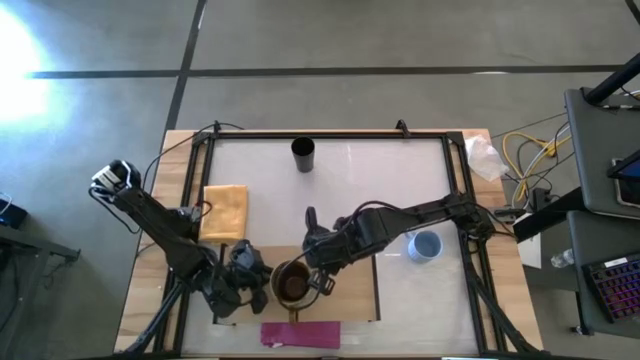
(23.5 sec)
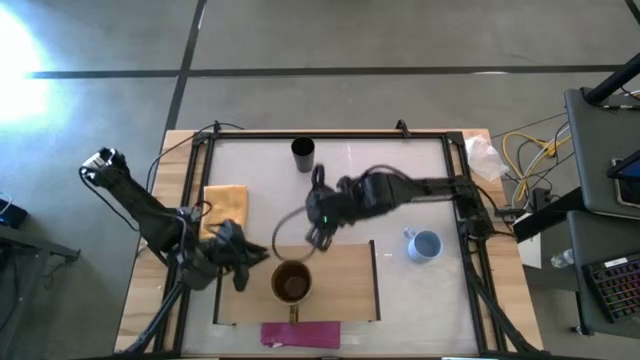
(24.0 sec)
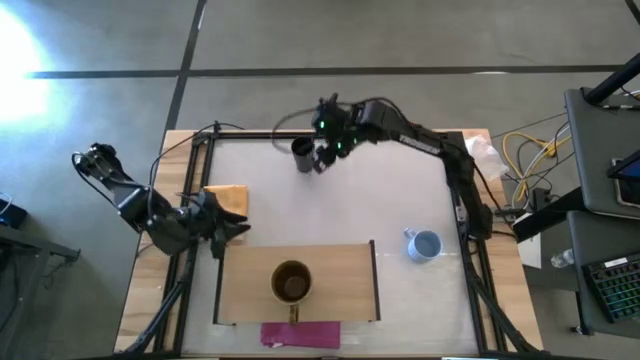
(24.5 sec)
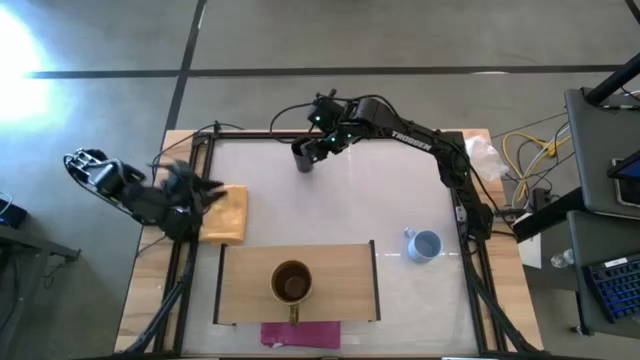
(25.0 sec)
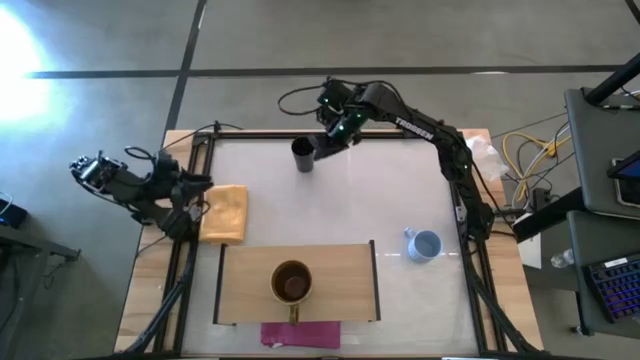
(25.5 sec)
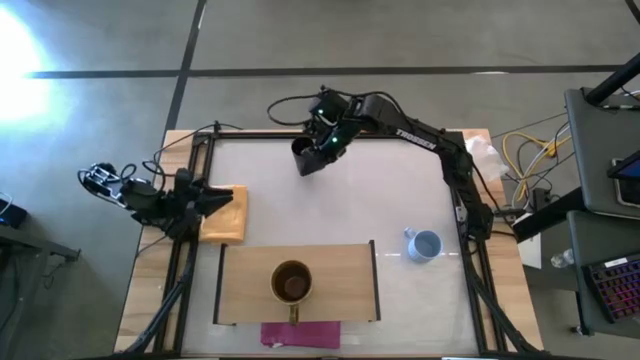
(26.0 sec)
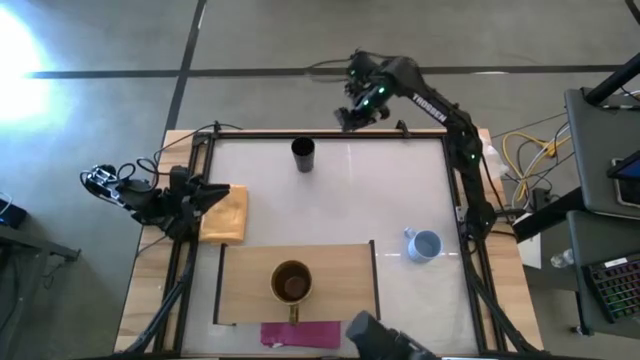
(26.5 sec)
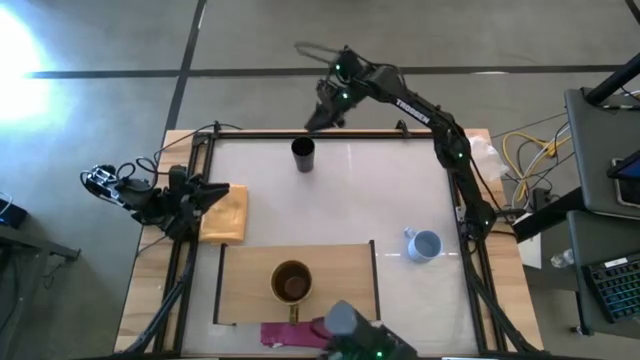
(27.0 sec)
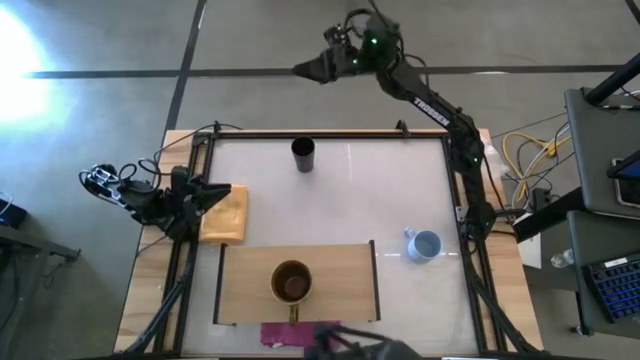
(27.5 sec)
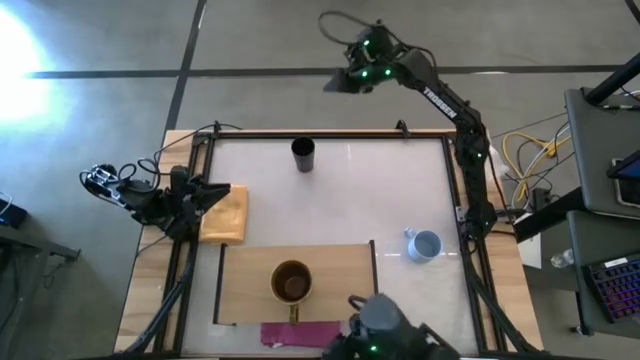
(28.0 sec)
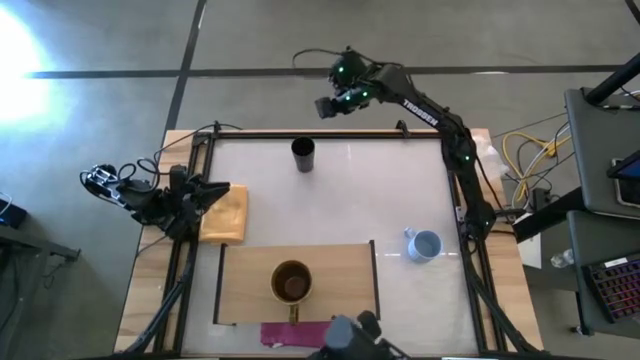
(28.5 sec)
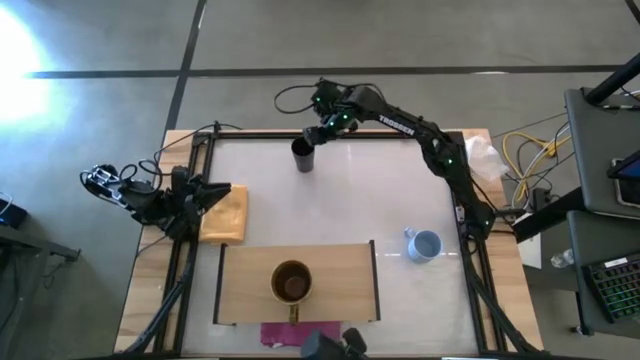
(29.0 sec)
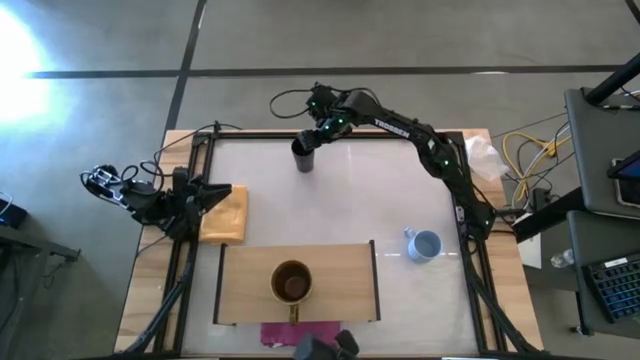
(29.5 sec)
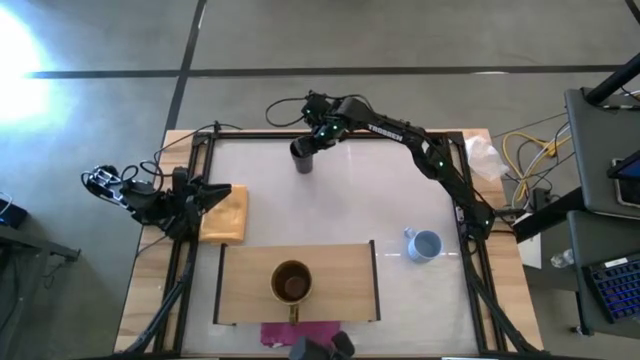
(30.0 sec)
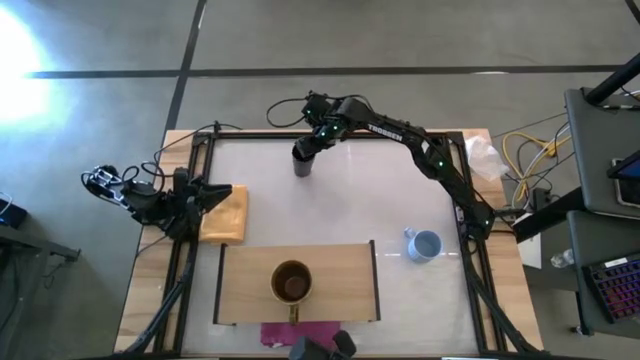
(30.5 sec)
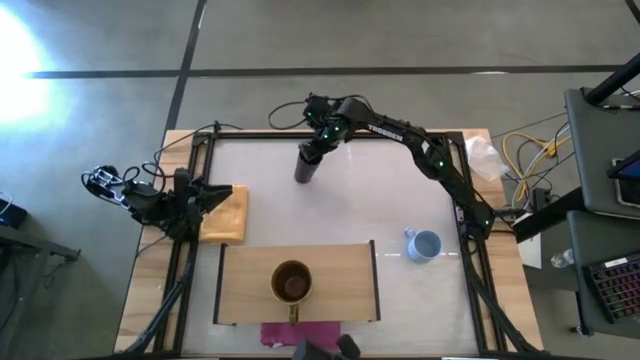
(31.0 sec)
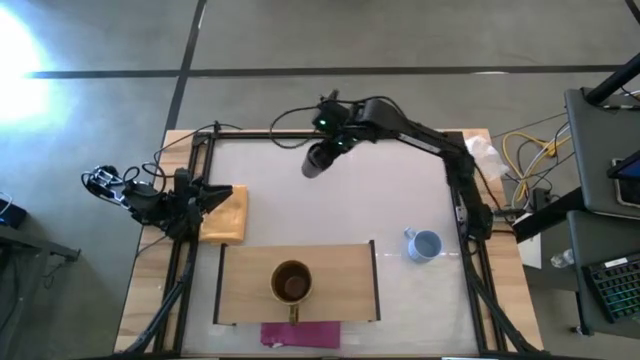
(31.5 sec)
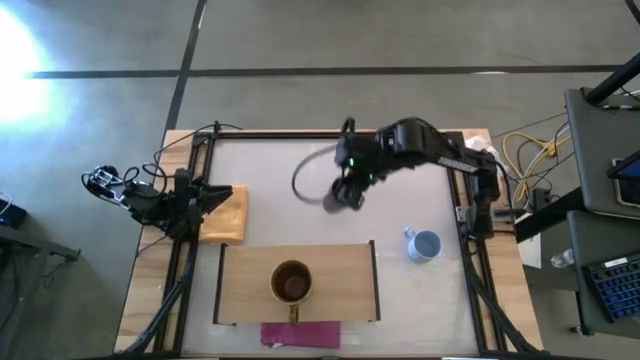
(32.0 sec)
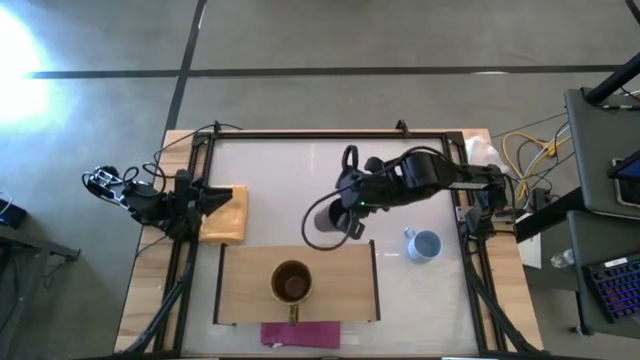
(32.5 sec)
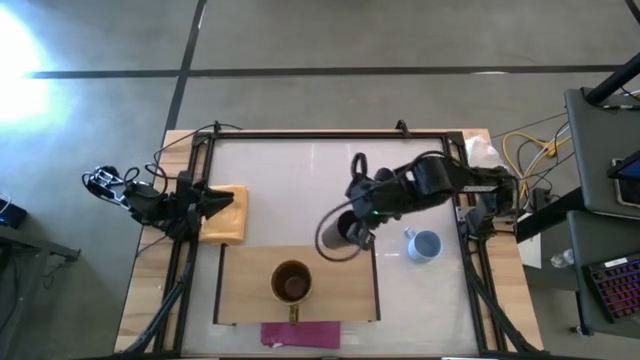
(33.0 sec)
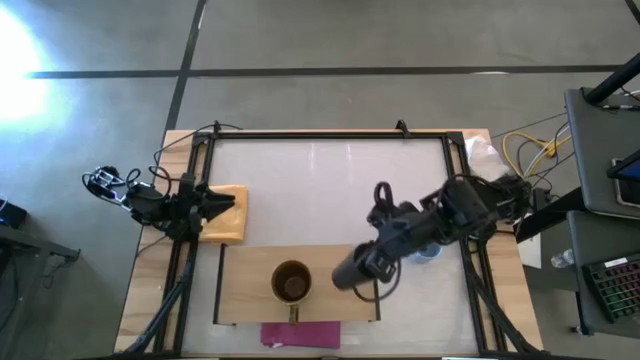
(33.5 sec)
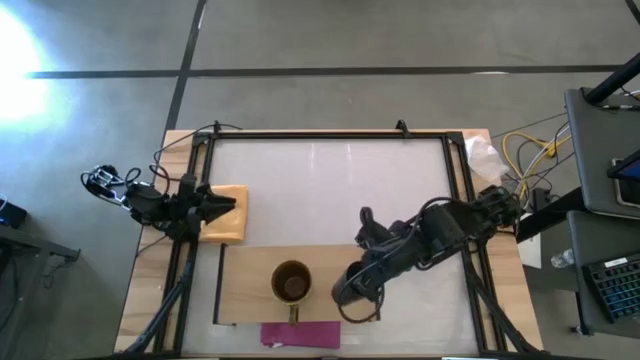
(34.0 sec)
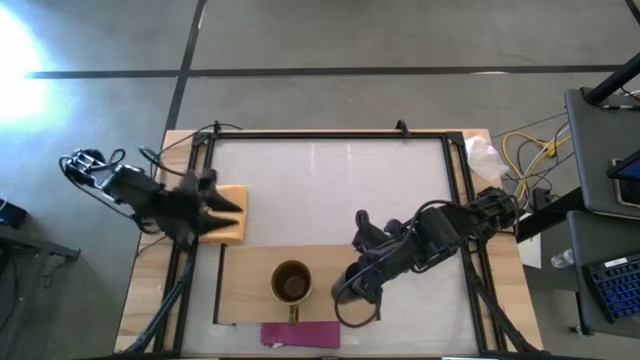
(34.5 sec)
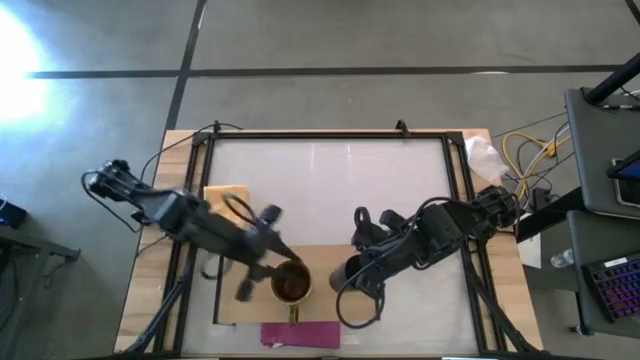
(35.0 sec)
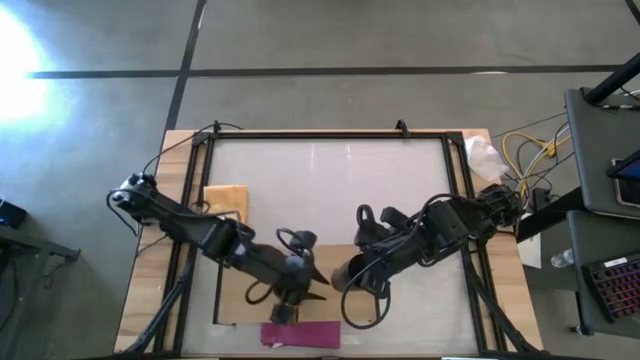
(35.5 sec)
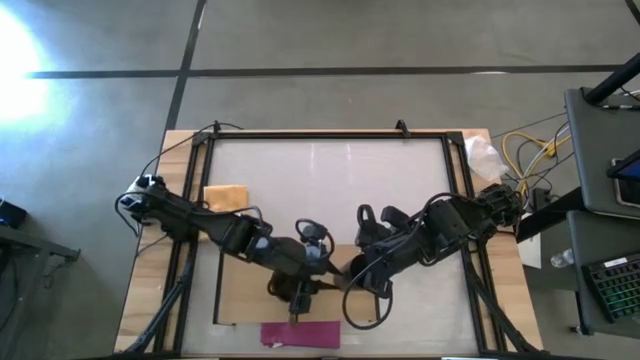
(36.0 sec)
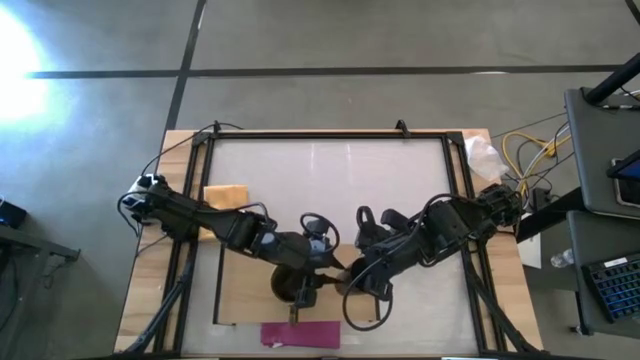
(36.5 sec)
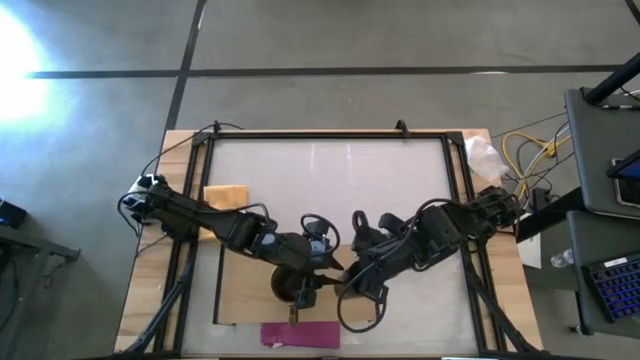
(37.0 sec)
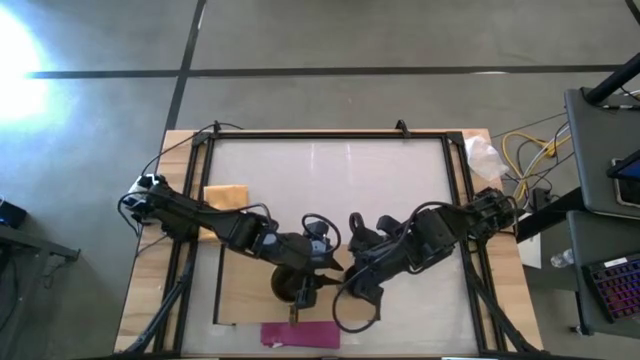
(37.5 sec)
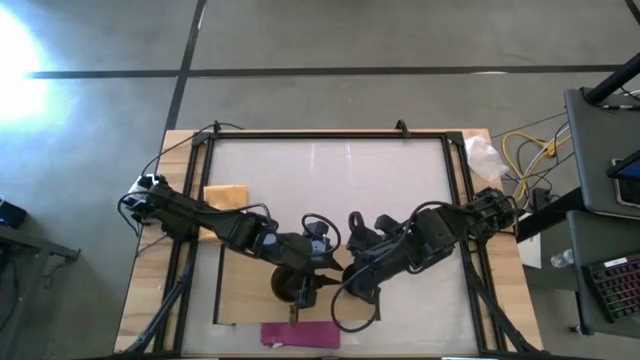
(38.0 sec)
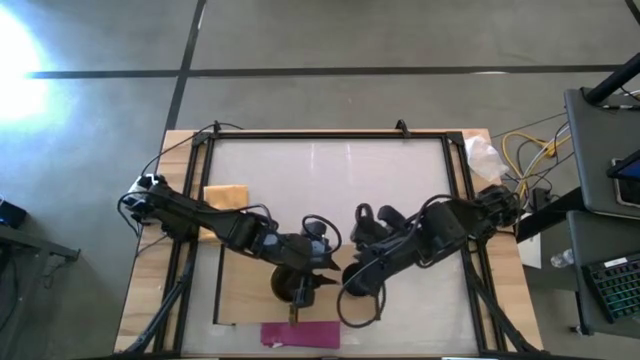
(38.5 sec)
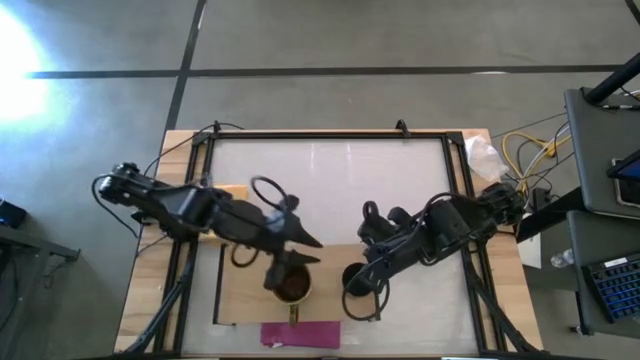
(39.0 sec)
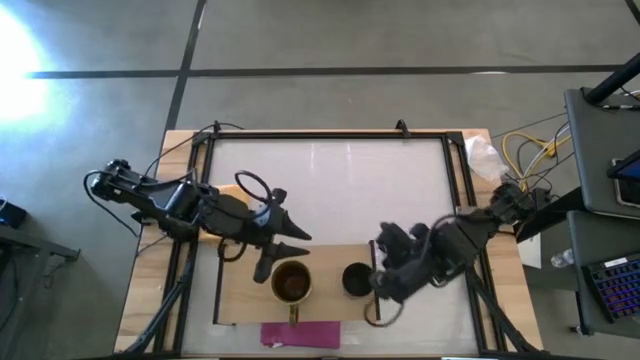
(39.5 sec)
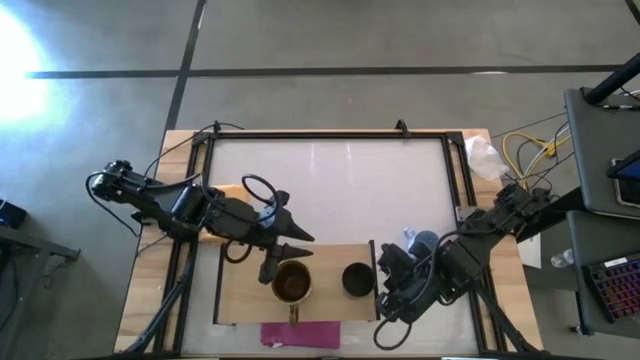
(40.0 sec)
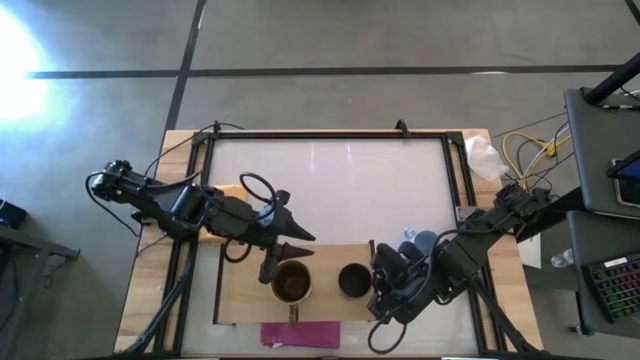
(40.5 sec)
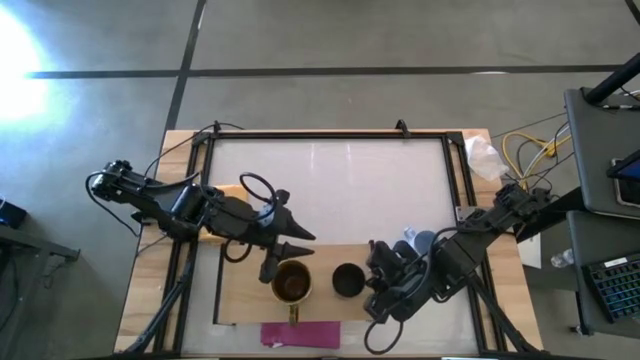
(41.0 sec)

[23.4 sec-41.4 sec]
Task: Stack small to large cups/mugs on shelf
Put the black cup on the shelf

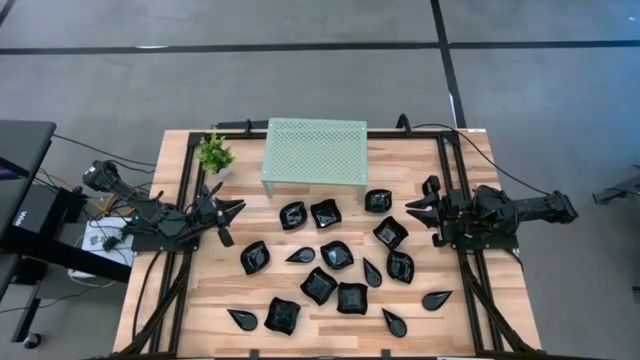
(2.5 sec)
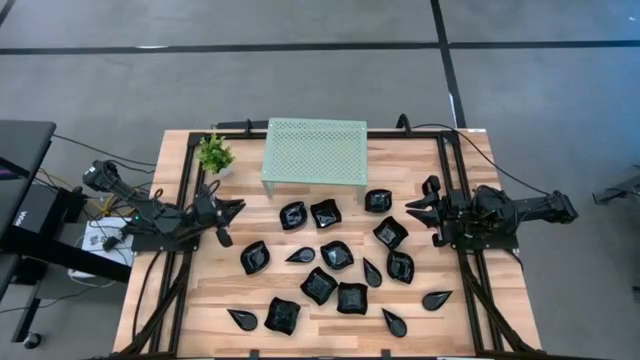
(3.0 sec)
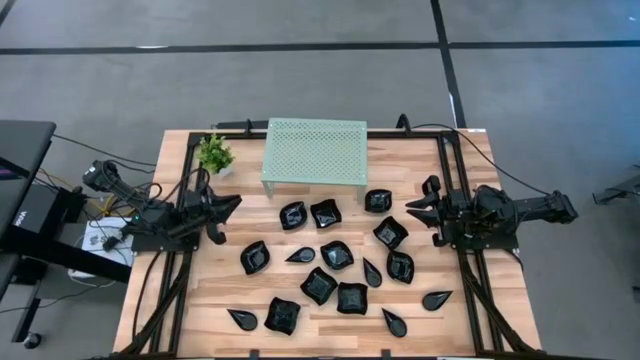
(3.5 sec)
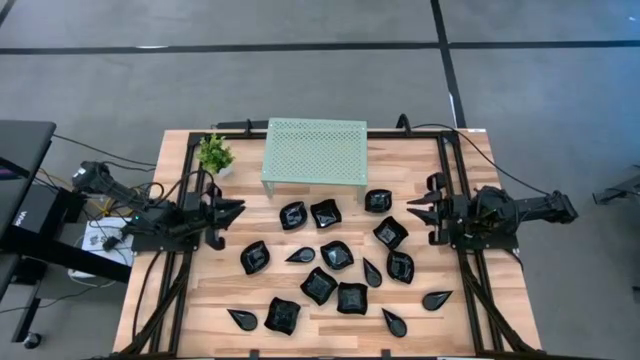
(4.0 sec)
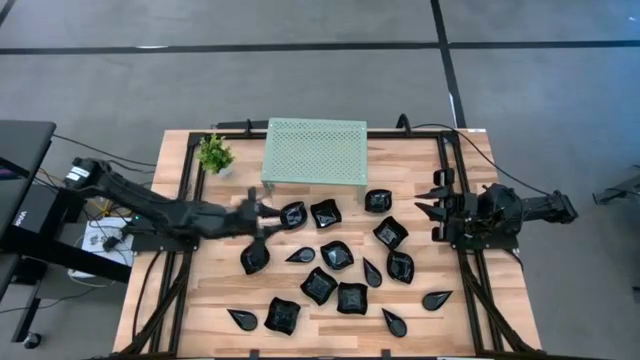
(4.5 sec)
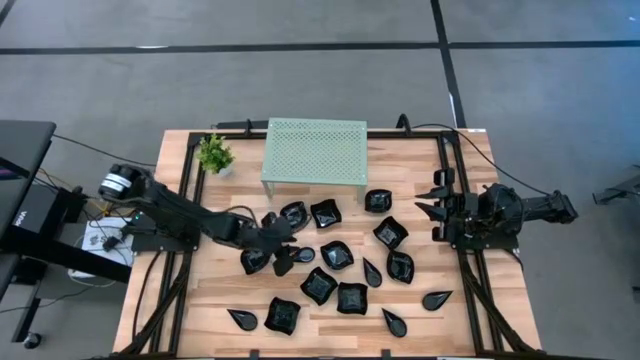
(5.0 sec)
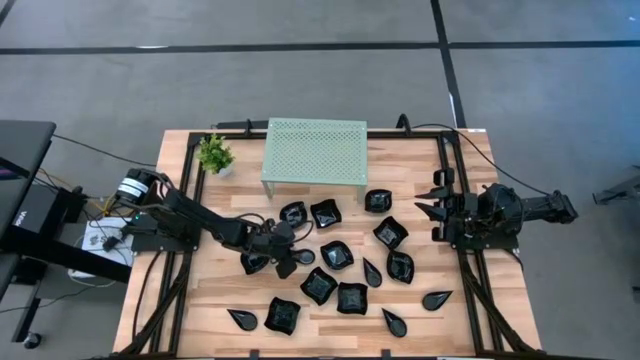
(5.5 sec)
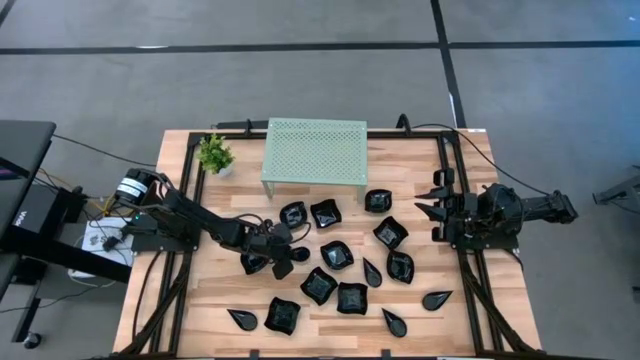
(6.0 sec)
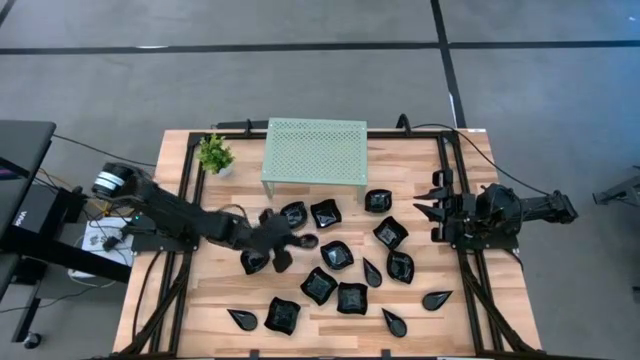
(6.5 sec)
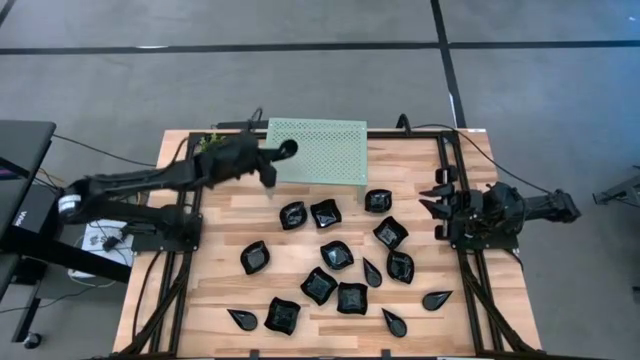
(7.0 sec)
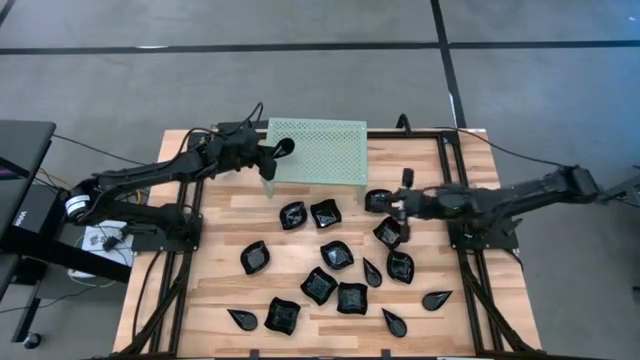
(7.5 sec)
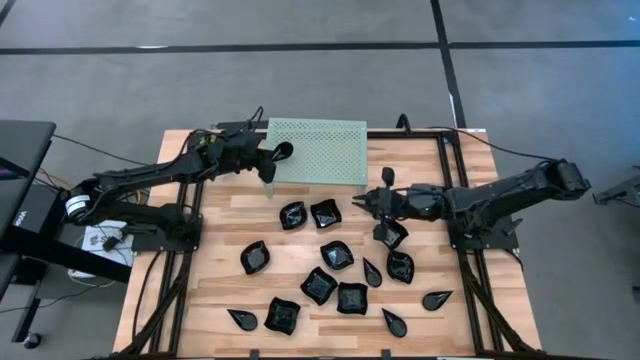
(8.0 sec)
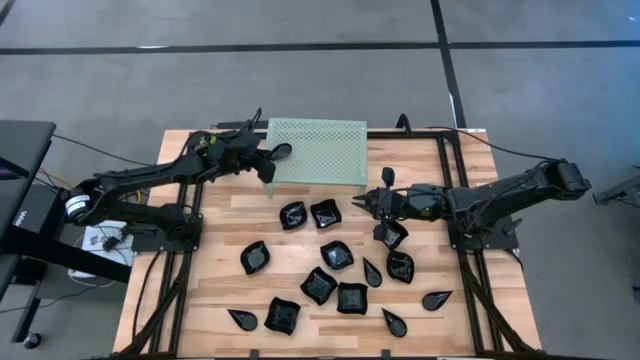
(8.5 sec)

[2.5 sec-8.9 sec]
Task: Pick & Place Mini shaped plates
Put the drop shaped plate on the shelf
